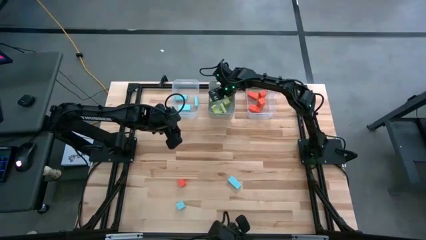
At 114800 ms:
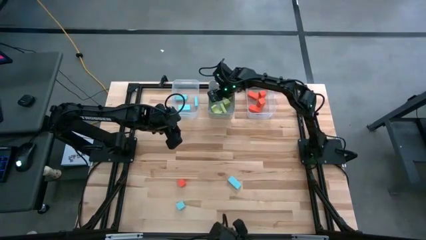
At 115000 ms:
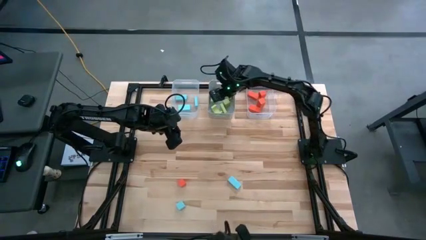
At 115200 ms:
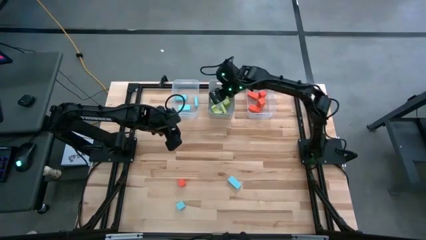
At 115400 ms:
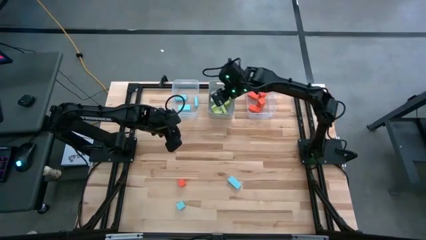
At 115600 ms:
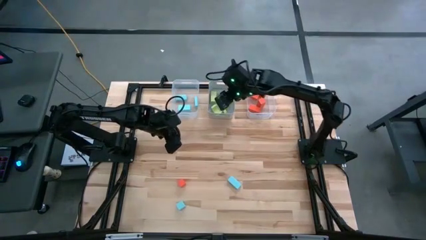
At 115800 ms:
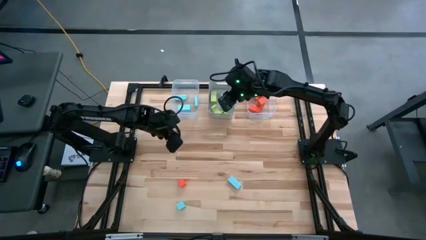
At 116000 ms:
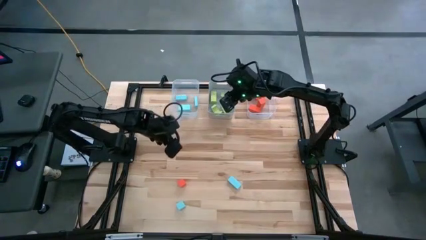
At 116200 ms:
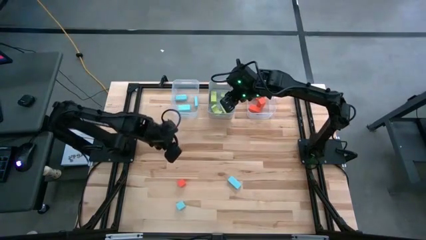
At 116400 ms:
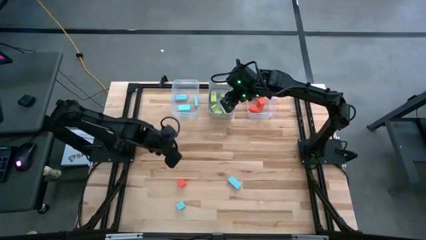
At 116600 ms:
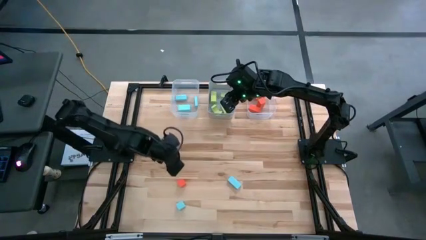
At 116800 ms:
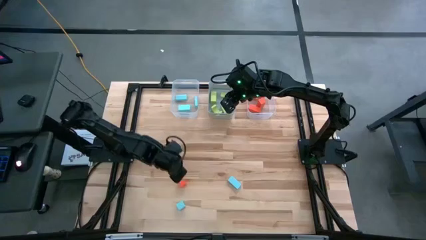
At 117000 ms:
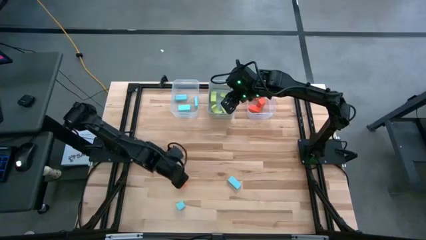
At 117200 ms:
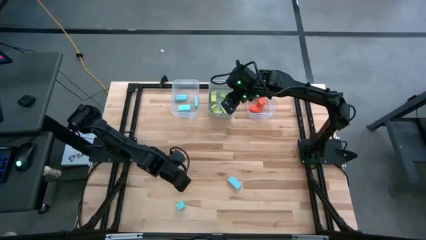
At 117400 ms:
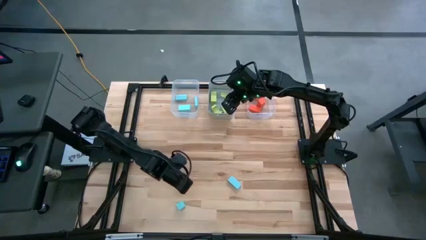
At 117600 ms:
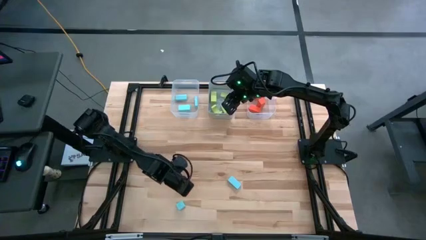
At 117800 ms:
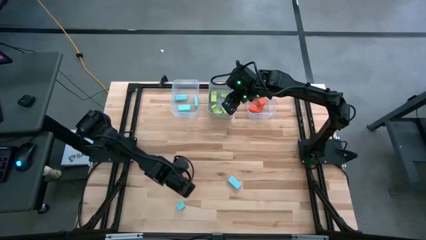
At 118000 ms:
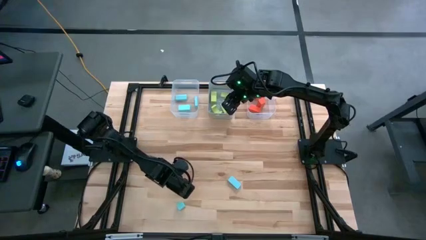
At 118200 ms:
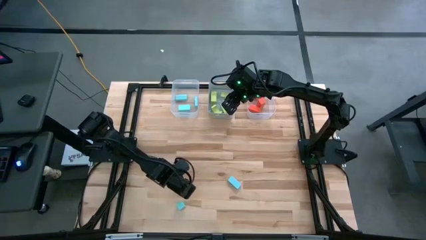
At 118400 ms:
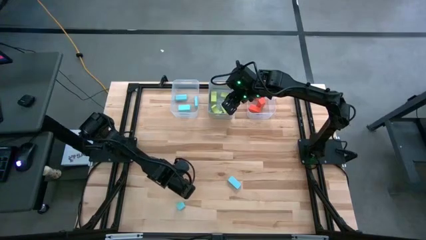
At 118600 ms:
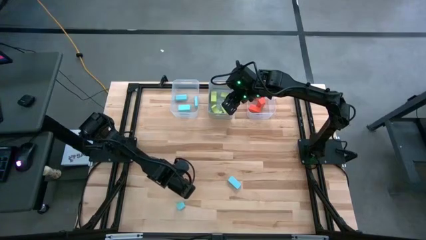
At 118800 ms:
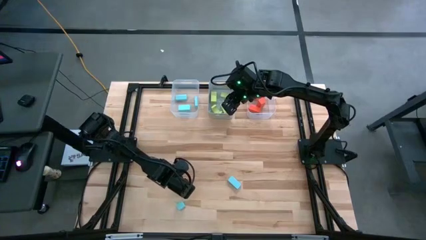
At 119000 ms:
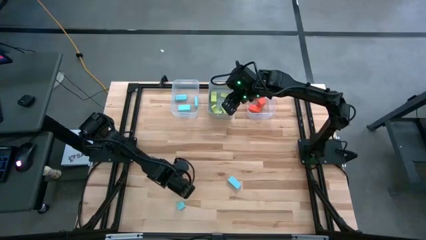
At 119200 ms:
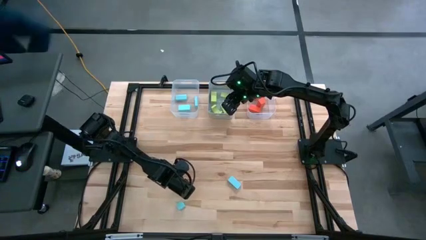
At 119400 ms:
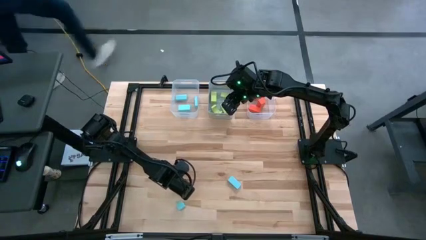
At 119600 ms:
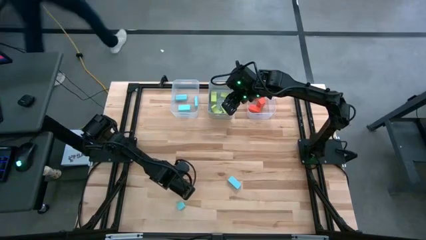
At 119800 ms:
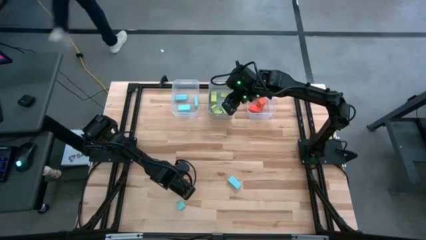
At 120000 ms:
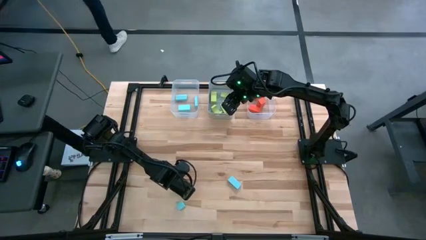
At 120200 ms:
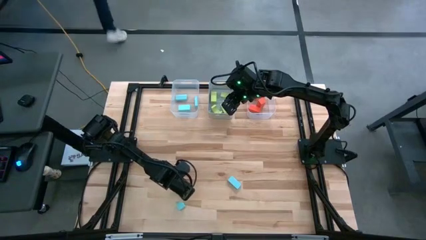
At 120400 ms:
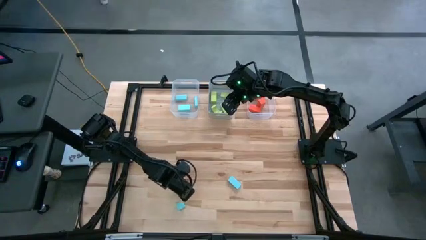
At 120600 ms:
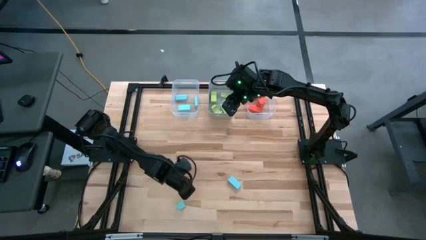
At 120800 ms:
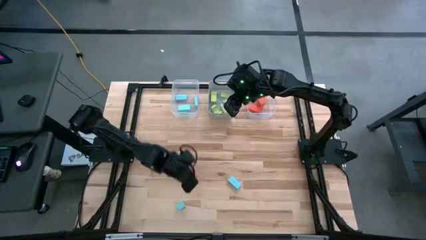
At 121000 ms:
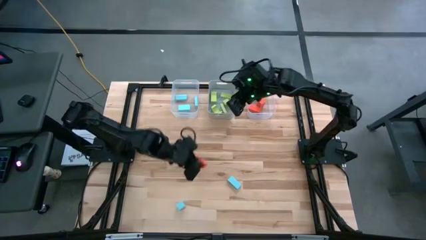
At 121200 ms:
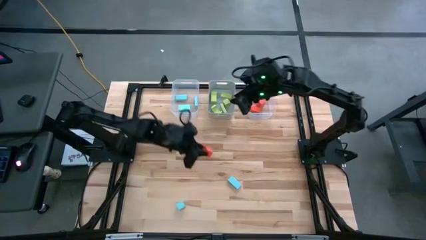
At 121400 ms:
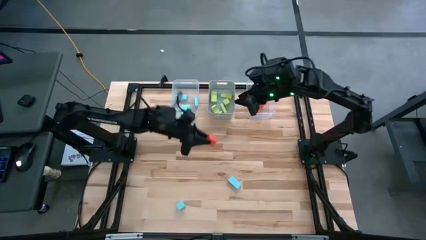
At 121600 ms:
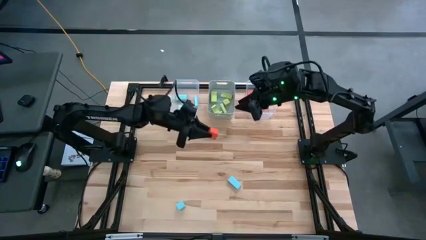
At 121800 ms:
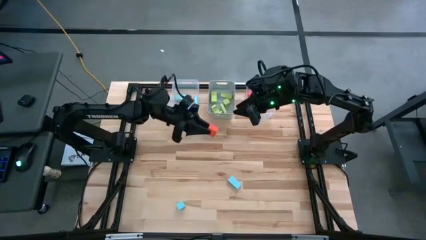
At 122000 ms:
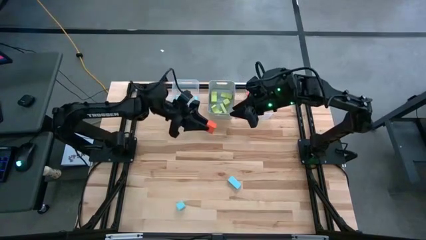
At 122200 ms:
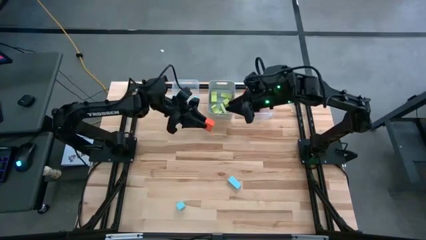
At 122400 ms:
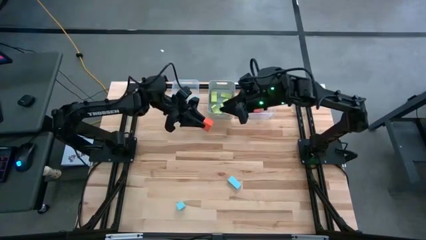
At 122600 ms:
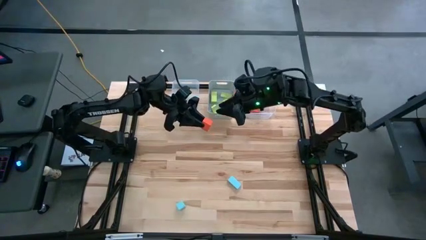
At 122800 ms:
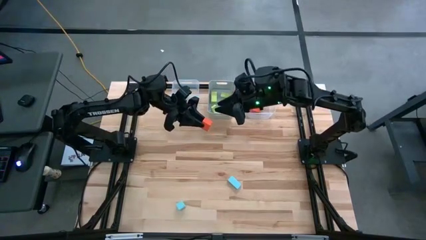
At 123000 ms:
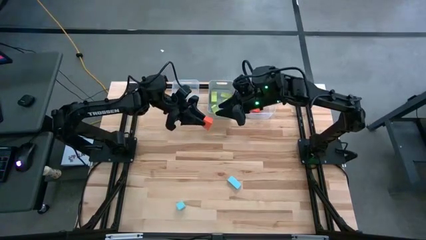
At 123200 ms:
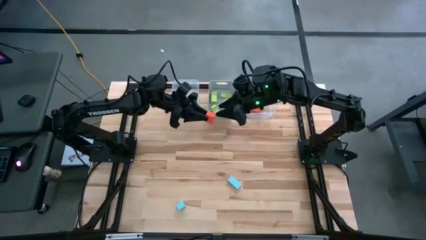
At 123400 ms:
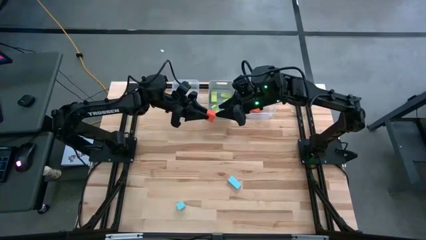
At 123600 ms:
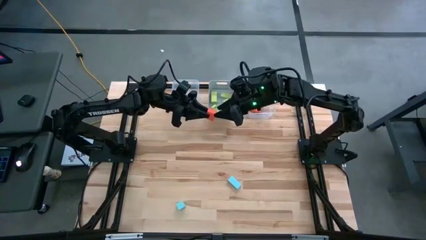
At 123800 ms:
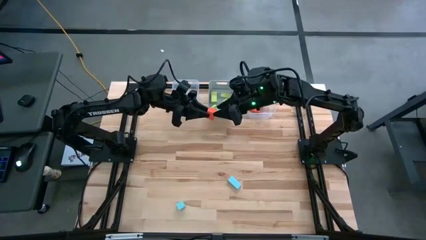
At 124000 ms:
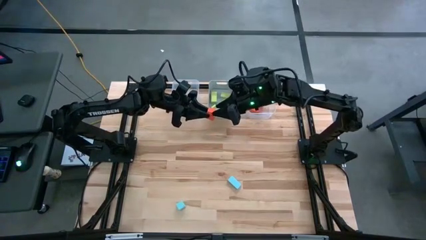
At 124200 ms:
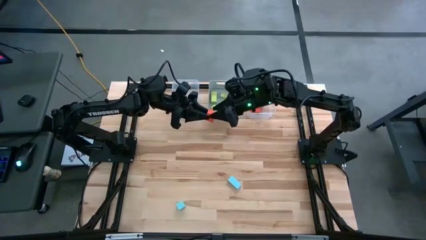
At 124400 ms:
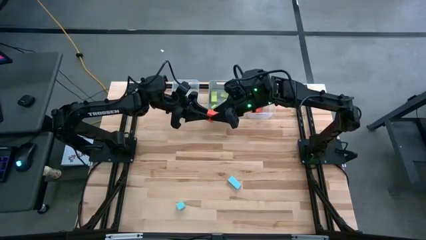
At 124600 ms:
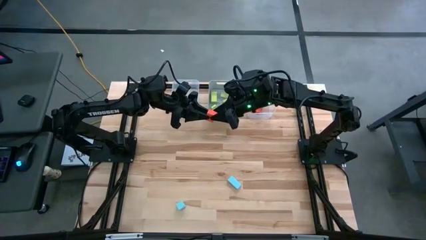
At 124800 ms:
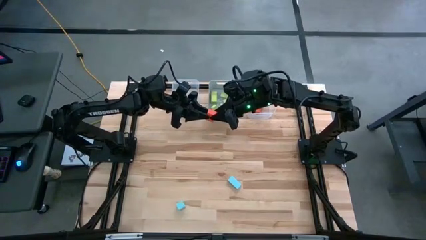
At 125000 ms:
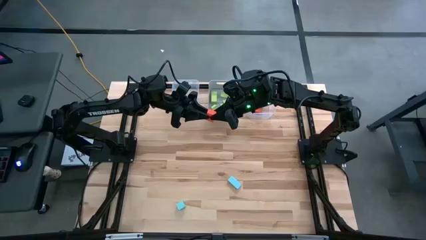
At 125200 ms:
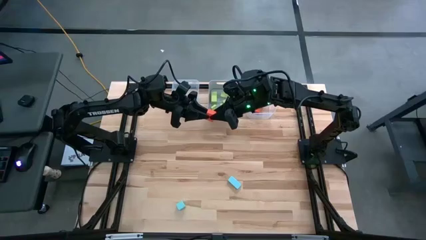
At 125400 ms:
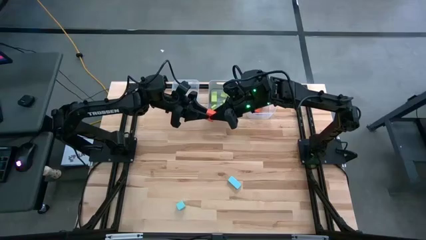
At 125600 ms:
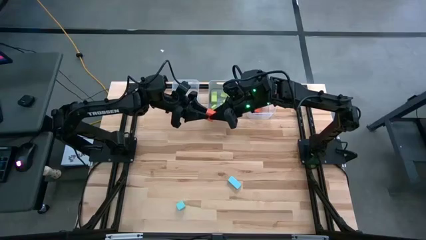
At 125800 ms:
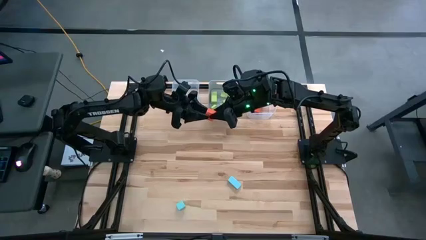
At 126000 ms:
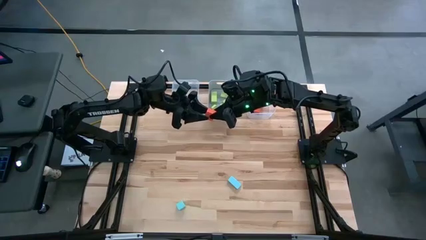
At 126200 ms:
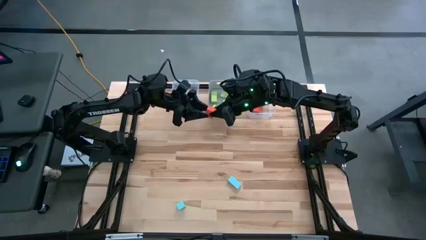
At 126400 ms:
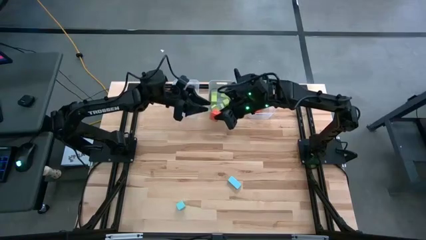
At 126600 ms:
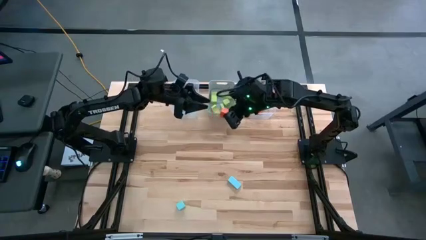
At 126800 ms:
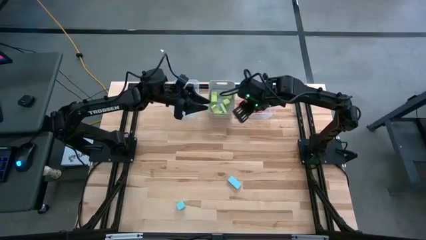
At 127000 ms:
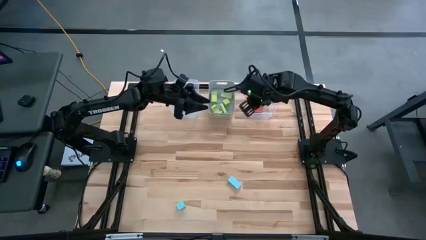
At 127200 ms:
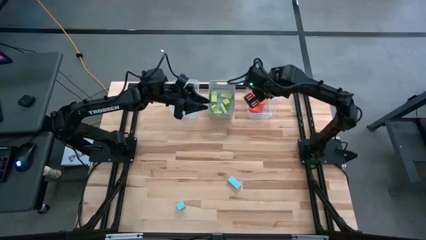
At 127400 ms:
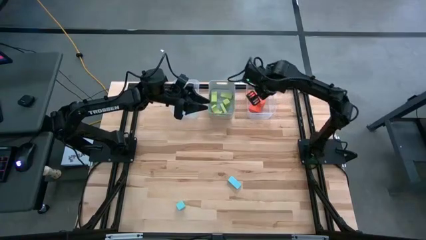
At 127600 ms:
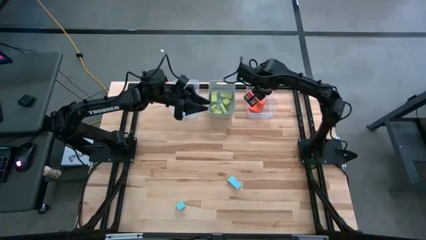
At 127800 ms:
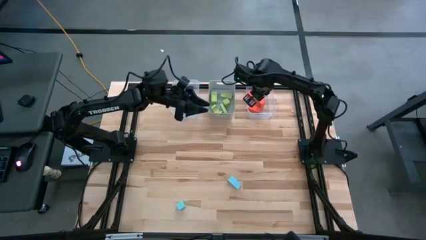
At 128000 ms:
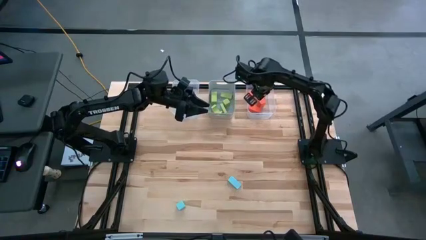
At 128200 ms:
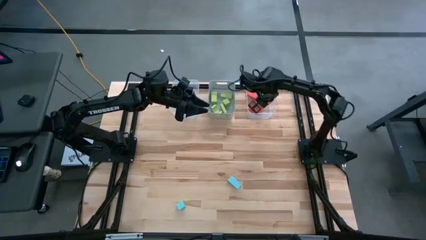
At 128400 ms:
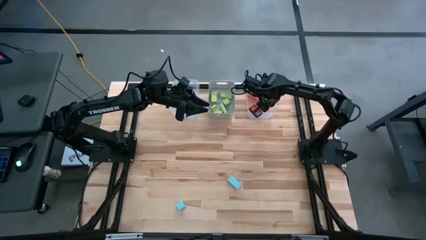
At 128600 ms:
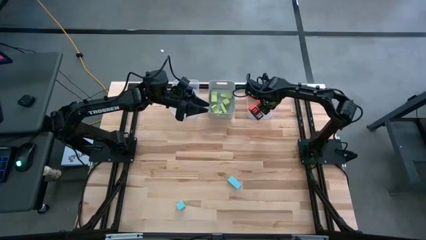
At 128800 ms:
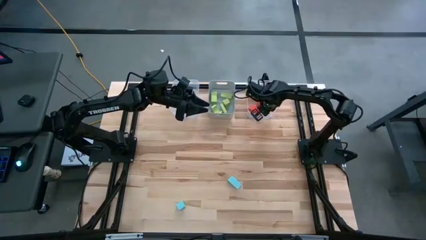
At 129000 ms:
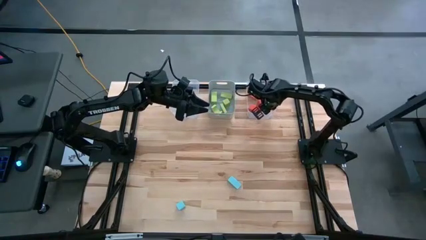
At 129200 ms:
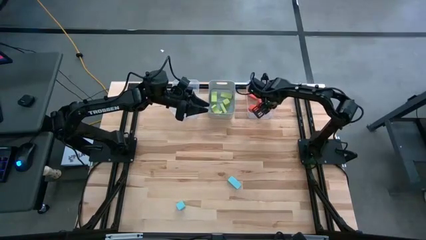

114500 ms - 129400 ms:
Task: Sort & place blocks by color
Put the orange block into the right transparent bin
